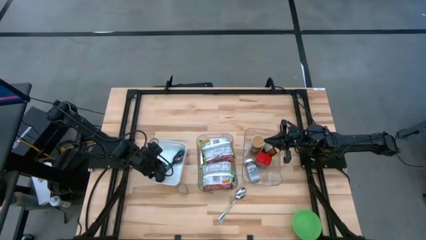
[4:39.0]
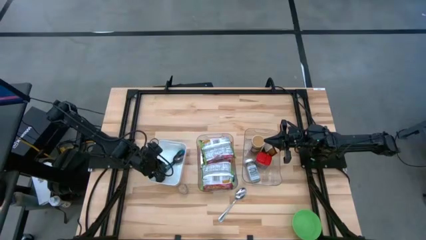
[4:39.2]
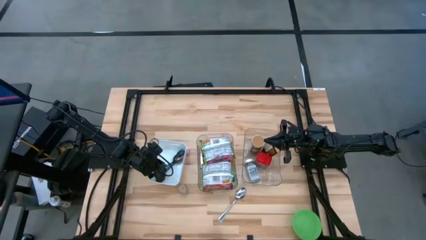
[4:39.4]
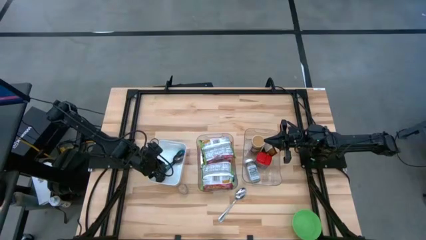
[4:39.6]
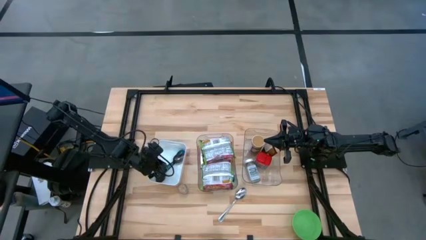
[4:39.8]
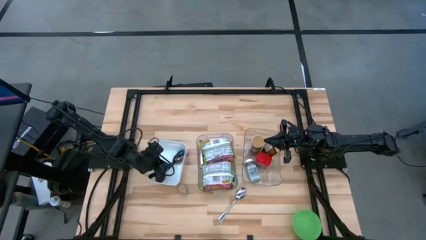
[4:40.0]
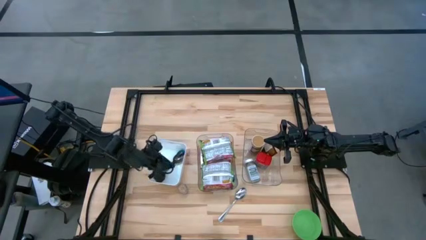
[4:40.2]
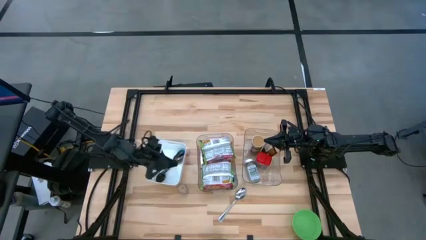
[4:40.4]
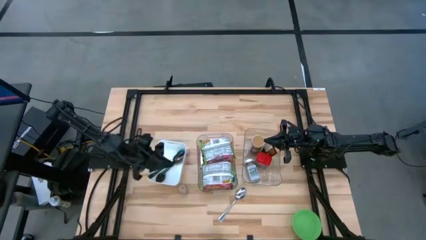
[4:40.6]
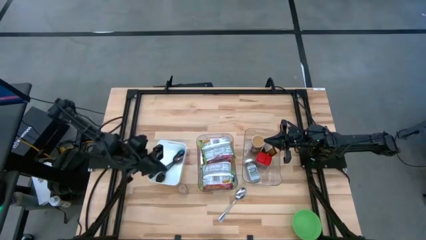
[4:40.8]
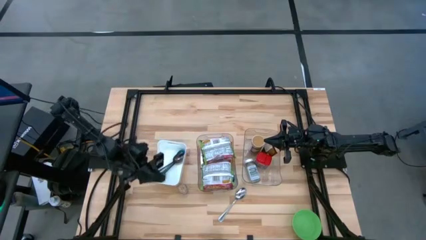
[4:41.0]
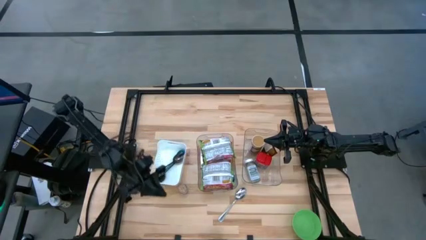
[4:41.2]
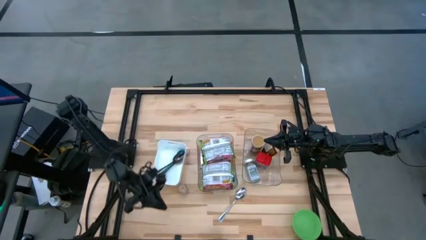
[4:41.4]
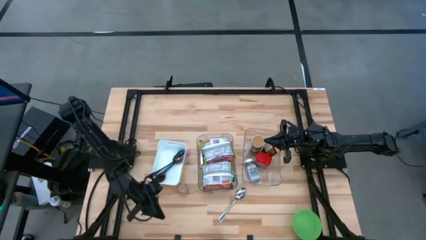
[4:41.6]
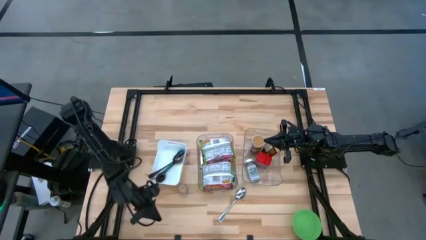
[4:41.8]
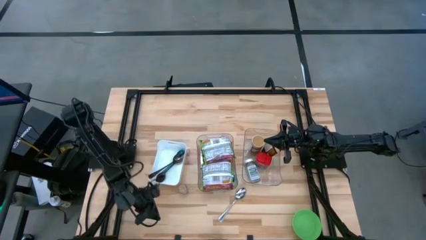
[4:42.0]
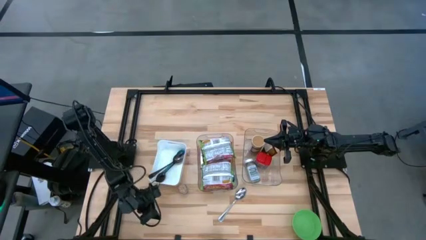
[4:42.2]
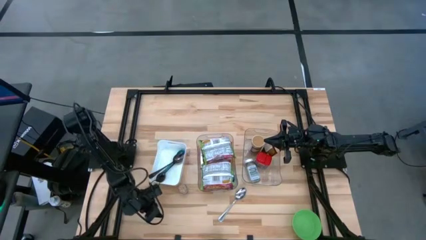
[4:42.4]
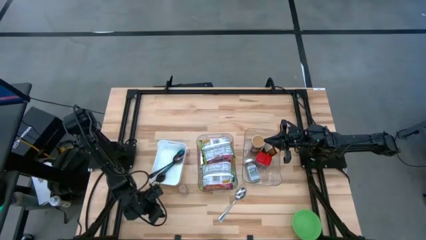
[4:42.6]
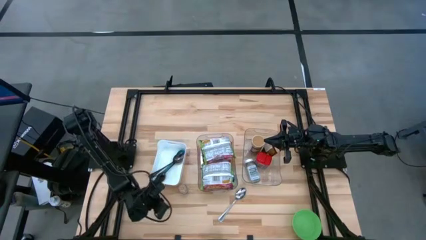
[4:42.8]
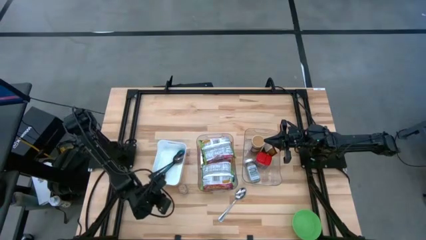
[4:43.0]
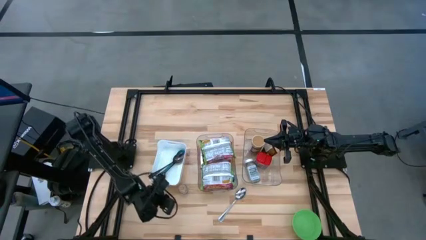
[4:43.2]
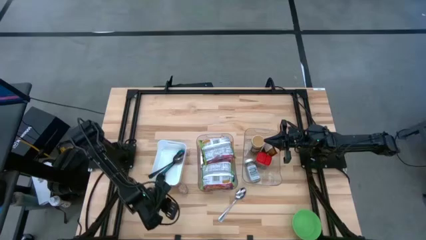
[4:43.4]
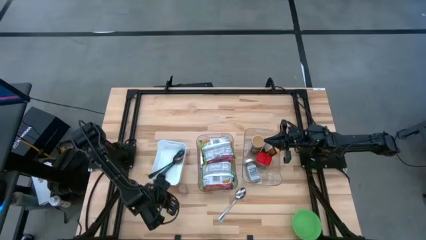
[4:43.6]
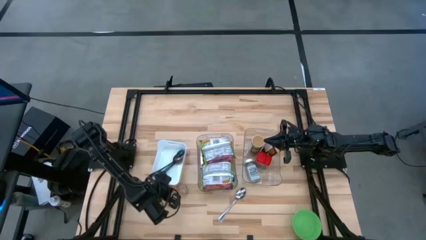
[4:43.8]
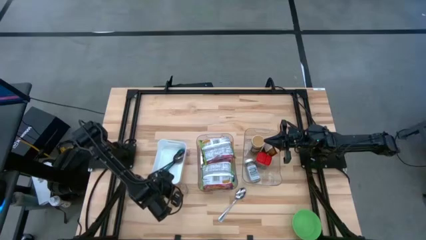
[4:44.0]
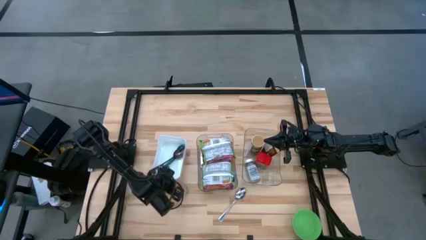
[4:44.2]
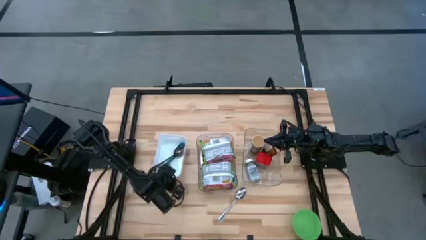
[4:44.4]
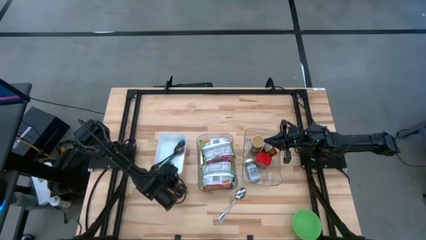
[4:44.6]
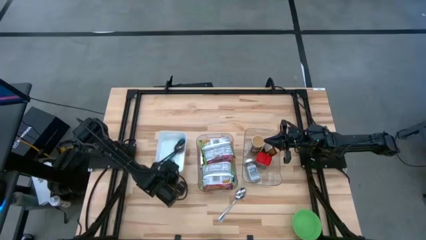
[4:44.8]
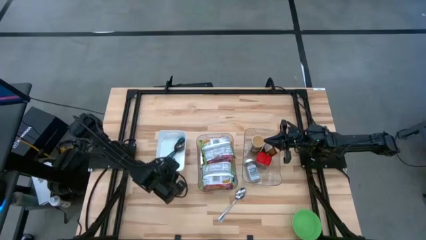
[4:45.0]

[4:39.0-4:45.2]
Task: Pick & Place Food Item
Adjust the white bin on the table

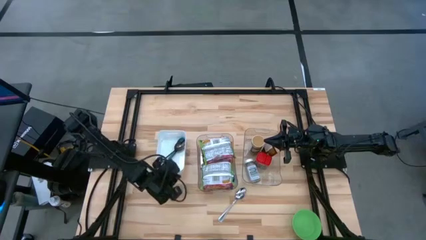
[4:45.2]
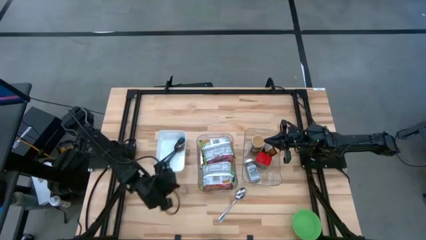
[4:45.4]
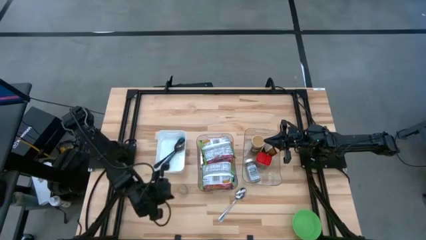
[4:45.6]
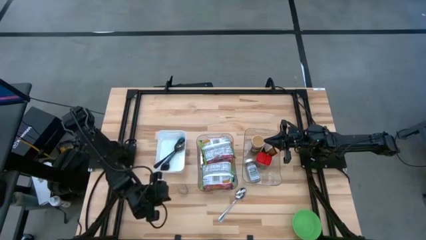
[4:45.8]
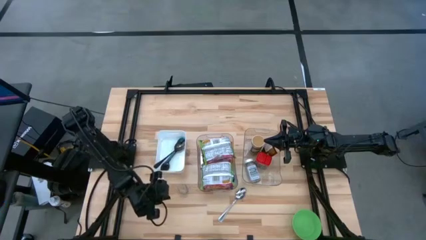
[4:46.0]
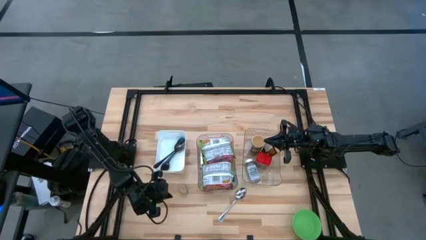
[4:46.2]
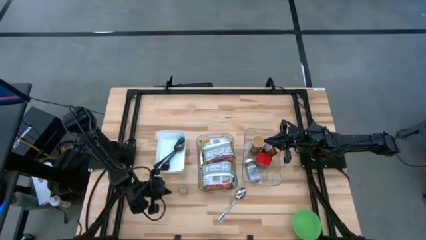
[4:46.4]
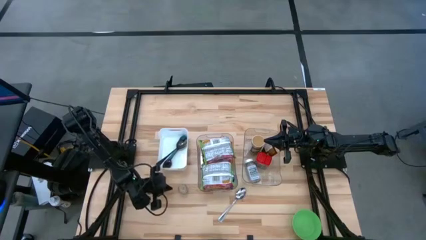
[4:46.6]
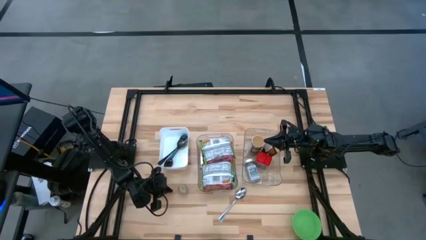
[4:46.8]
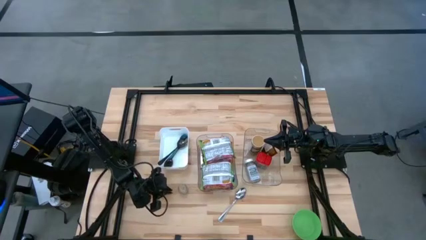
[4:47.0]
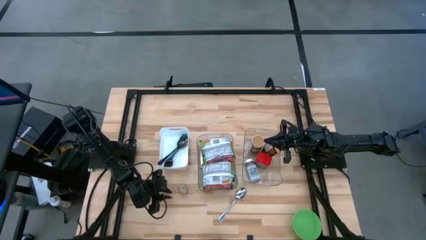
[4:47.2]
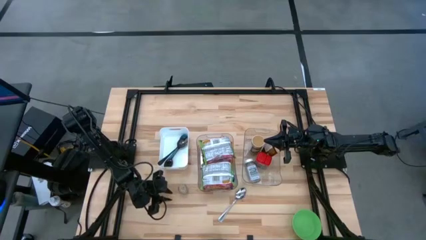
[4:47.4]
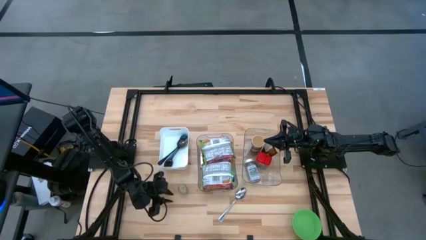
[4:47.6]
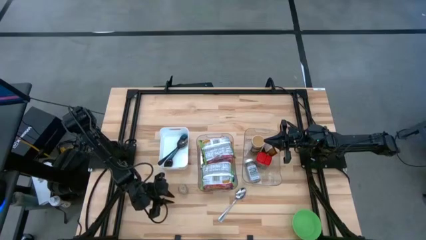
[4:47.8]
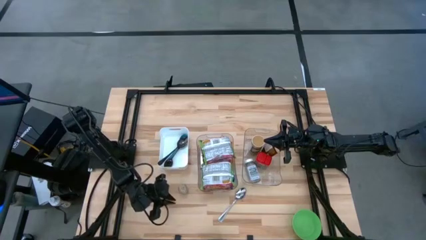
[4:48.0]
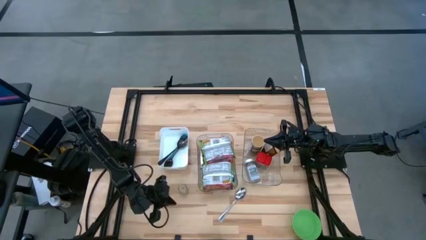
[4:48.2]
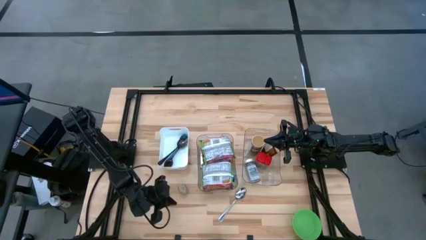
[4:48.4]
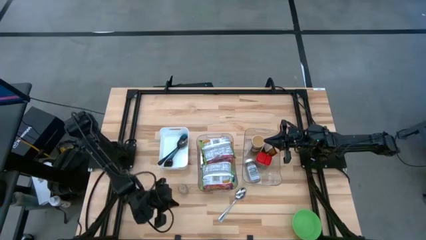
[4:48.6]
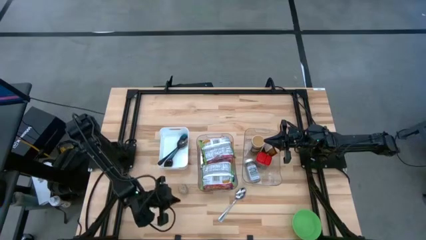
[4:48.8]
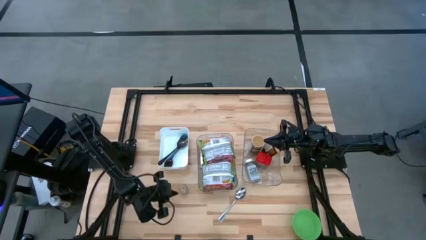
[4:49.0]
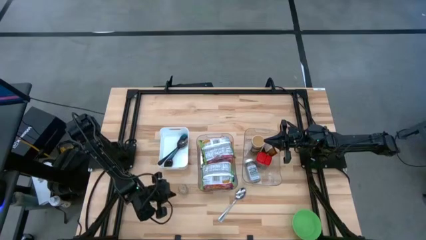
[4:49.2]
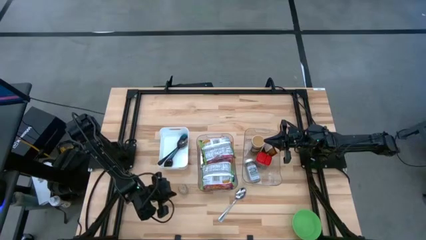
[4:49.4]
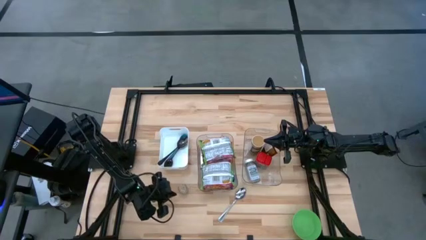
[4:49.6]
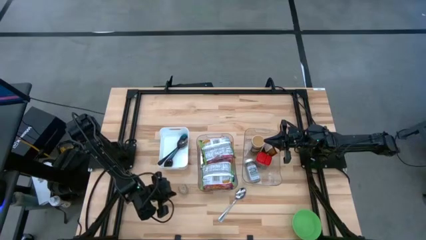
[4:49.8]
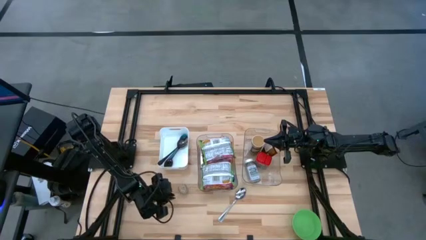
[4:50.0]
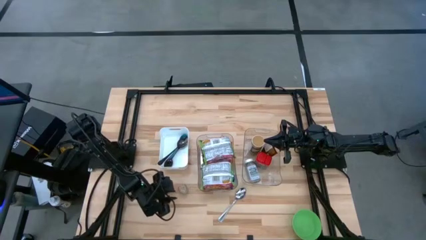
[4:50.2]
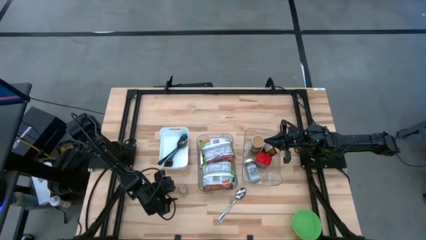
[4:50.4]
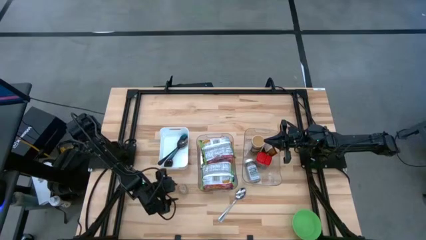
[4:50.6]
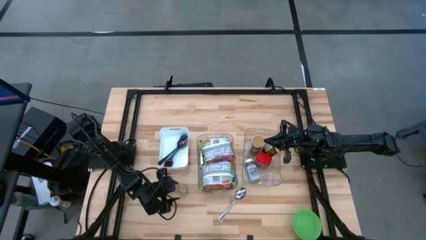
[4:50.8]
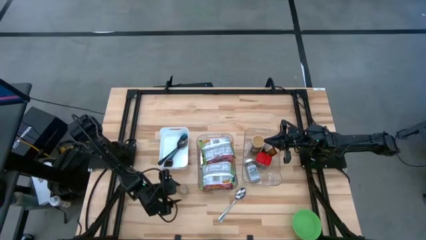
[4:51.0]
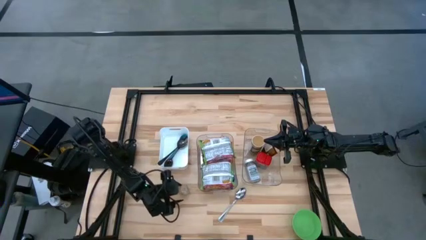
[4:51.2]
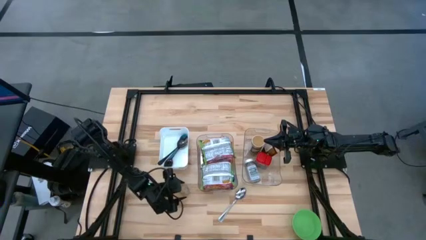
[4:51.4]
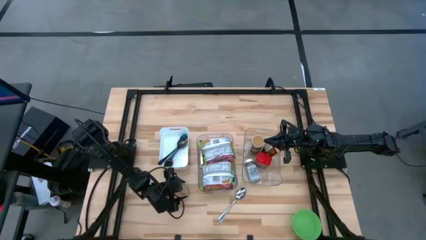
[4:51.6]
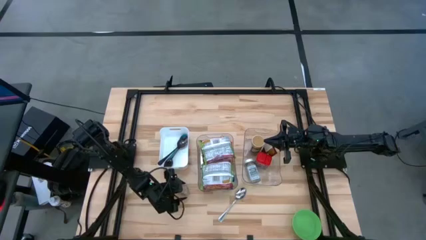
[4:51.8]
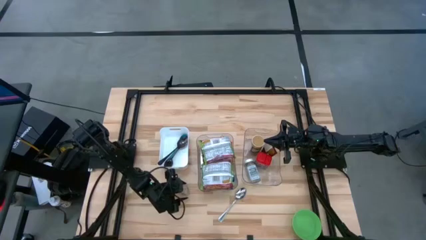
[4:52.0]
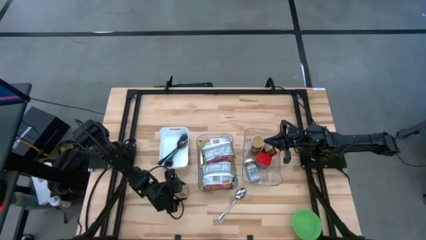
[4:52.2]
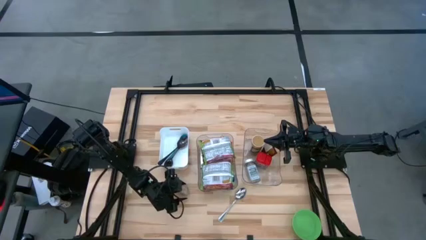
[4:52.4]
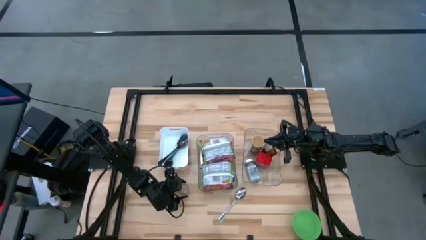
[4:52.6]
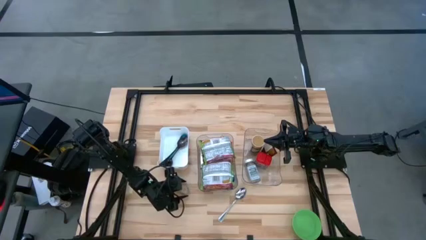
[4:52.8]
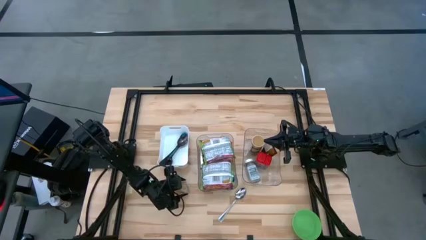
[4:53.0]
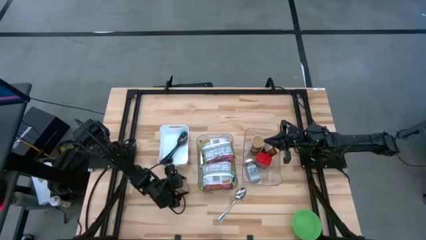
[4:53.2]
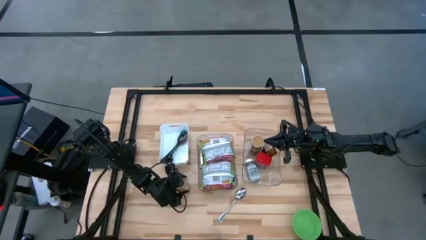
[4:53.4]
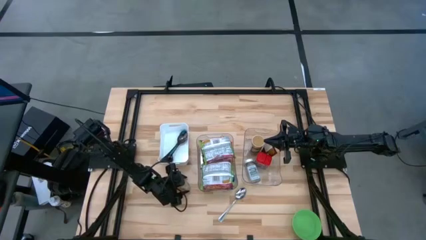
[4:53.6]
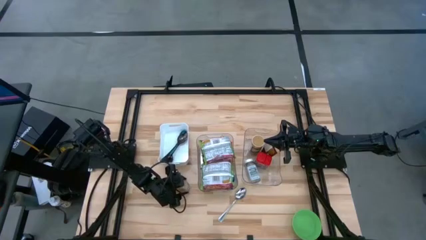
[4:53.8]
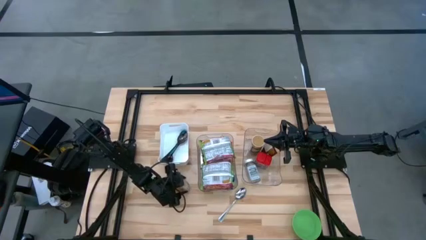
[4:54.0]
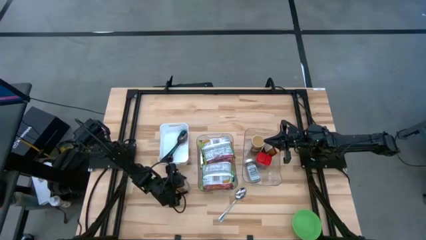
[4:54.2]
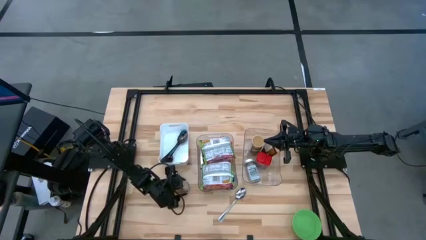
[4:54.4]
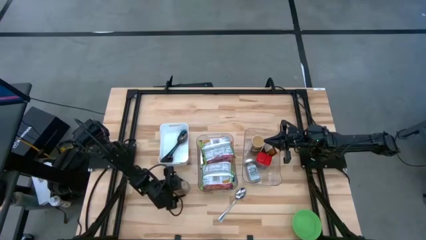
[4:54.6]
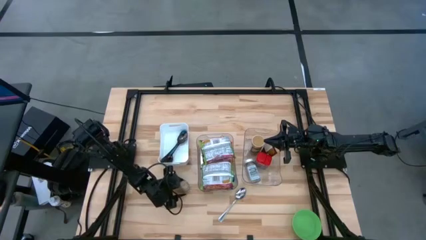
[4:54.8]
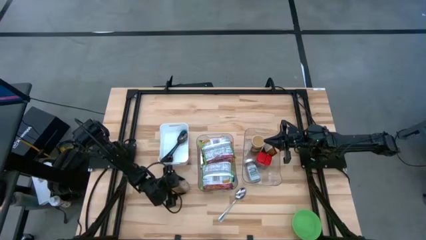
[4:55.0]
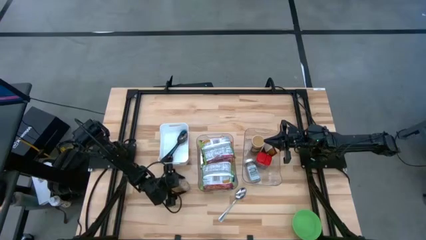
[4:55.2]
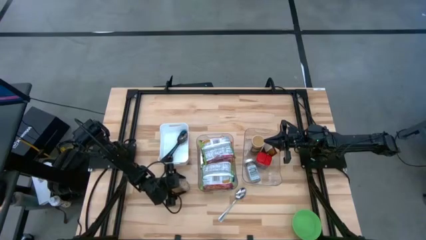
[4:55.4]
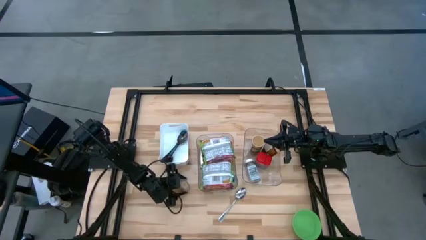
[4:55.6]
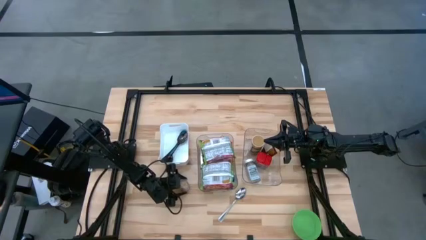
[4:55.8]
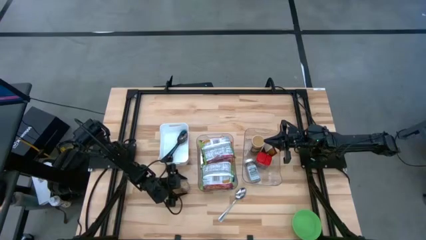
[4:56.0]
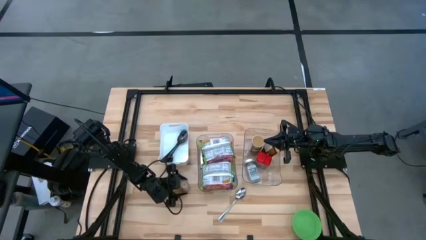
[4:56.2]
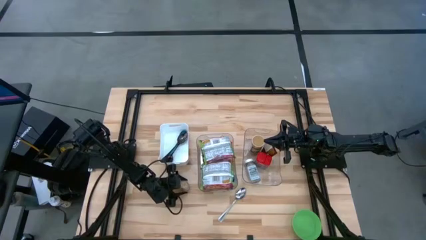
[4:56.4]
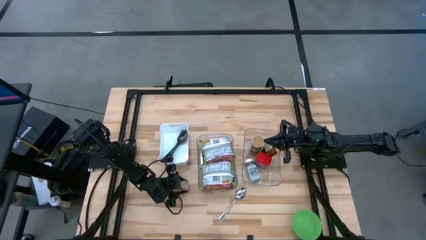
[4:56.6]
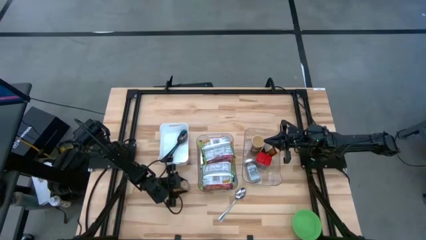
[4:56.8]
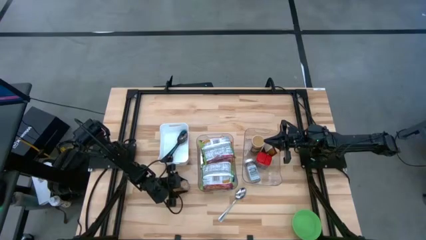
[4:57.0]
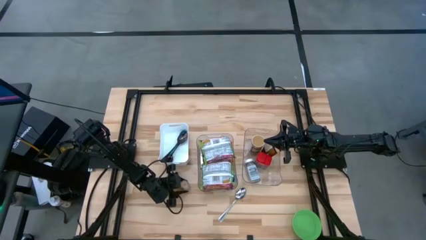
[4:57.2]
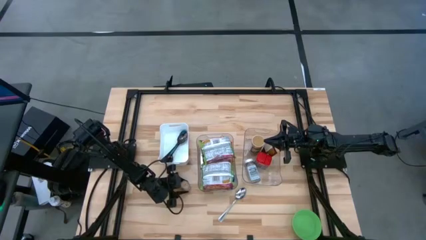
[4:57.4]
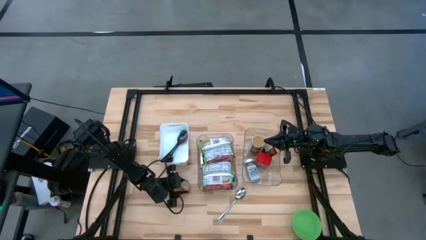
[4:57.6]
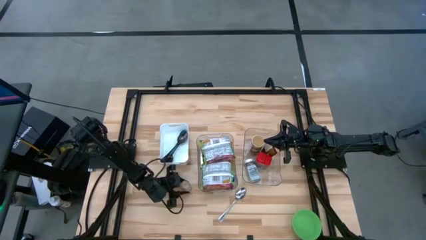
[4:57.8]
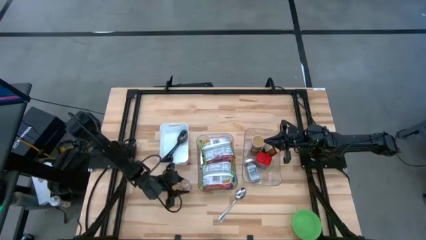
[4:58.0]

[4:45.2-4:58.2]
Put the brown seasoning bottle into the right transparent bin
